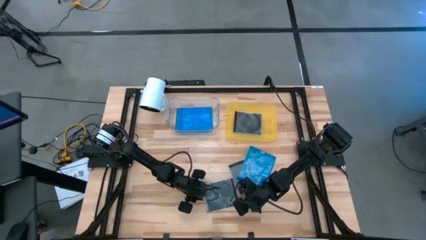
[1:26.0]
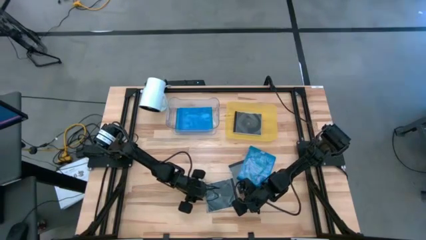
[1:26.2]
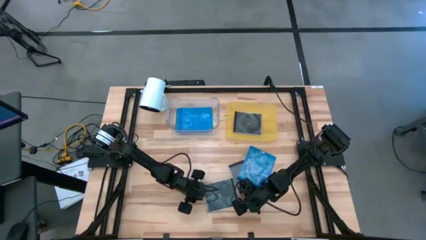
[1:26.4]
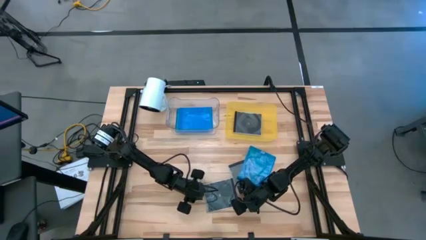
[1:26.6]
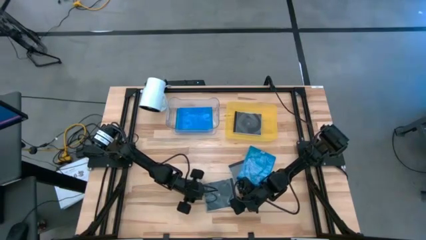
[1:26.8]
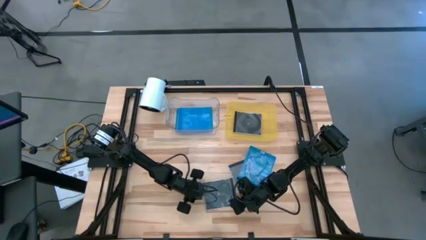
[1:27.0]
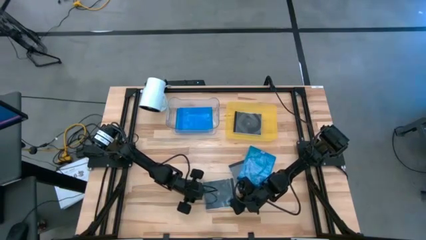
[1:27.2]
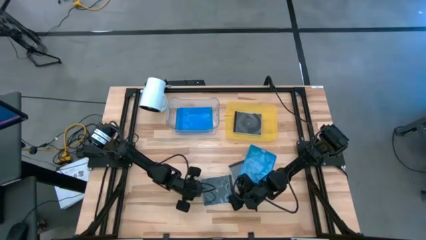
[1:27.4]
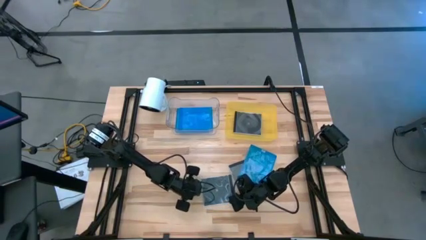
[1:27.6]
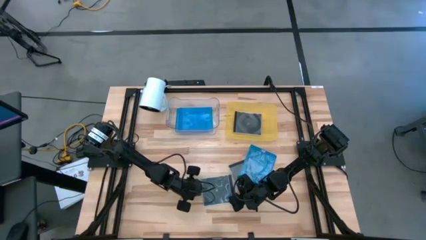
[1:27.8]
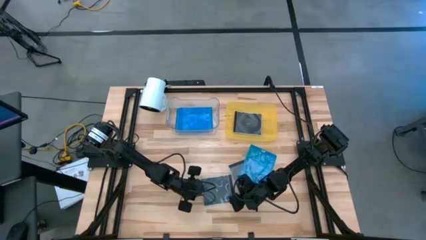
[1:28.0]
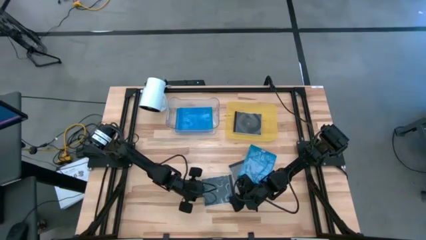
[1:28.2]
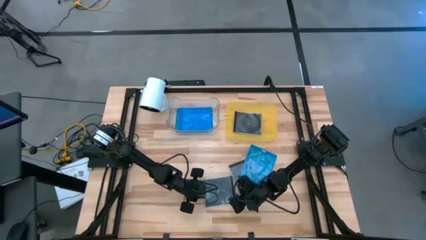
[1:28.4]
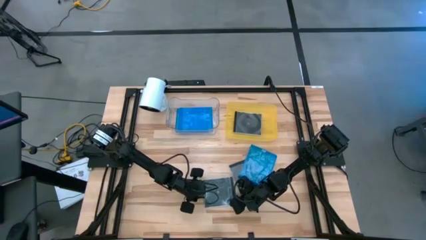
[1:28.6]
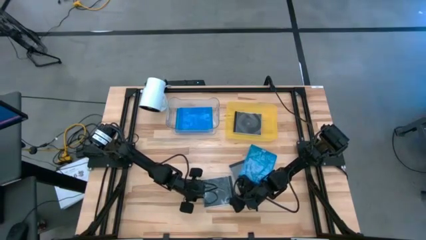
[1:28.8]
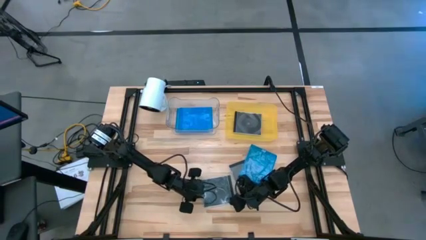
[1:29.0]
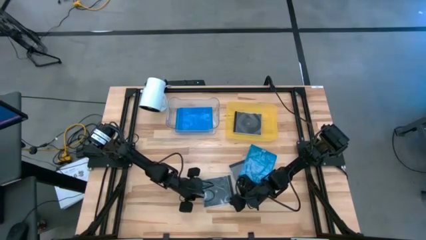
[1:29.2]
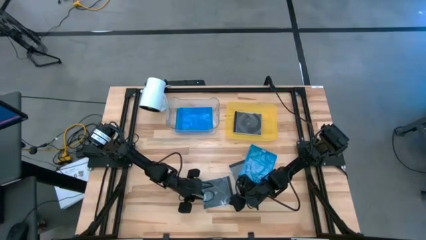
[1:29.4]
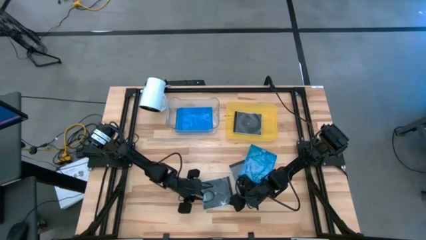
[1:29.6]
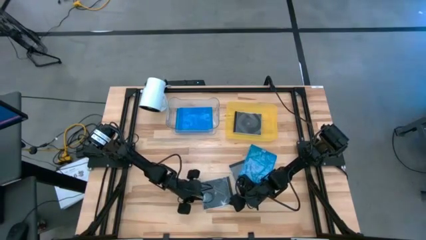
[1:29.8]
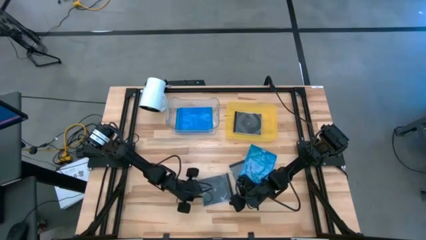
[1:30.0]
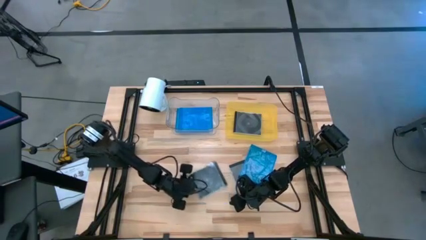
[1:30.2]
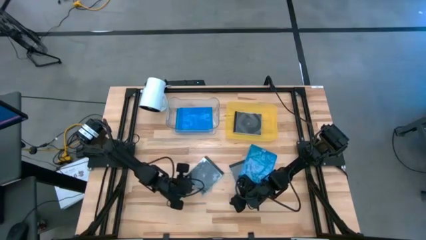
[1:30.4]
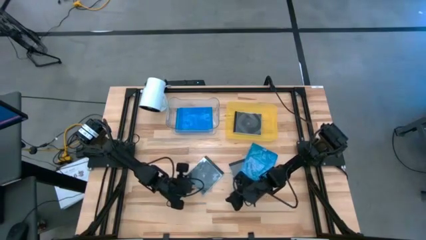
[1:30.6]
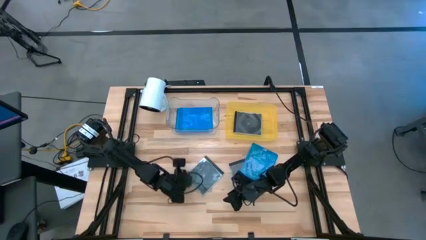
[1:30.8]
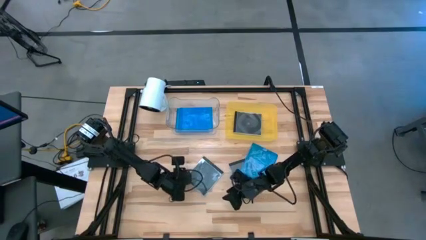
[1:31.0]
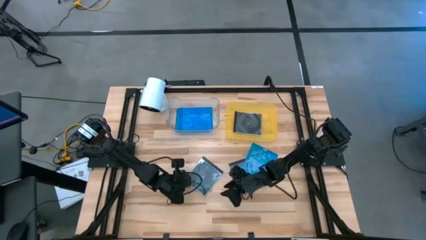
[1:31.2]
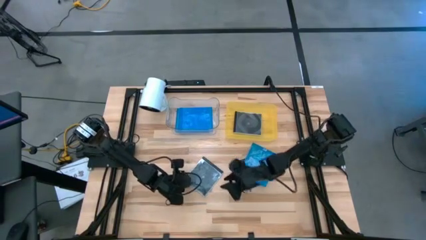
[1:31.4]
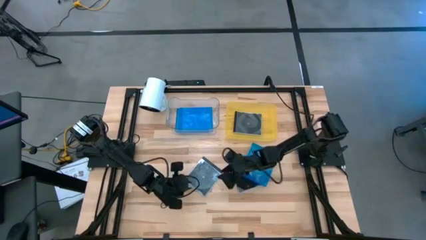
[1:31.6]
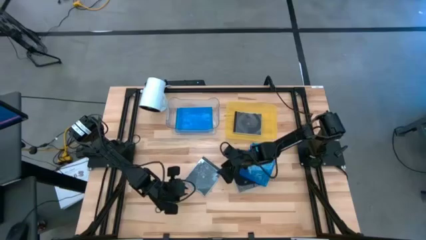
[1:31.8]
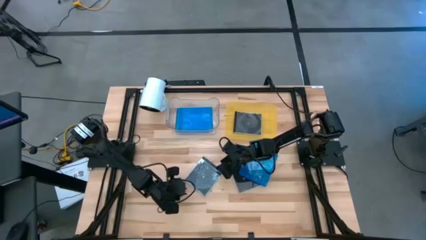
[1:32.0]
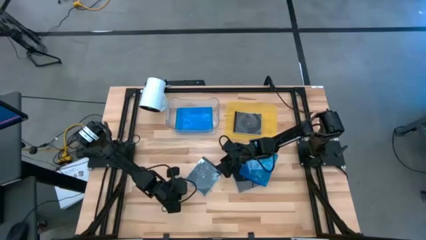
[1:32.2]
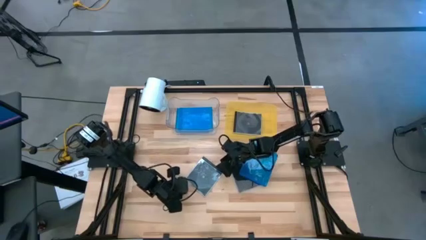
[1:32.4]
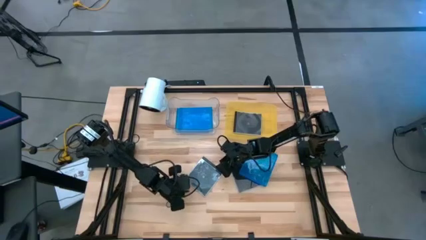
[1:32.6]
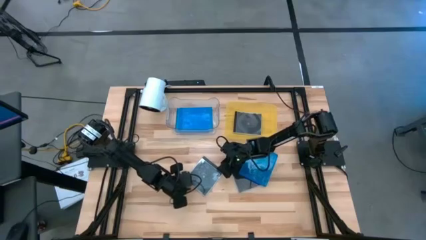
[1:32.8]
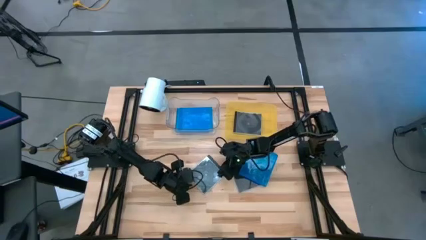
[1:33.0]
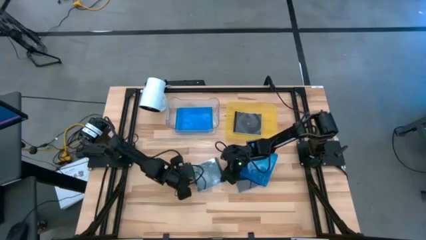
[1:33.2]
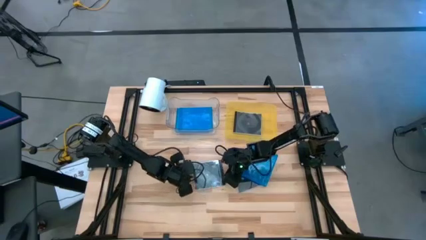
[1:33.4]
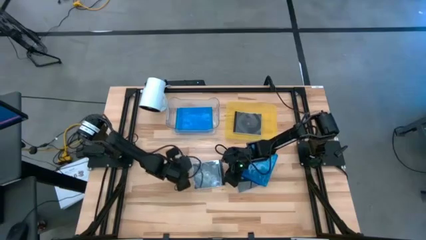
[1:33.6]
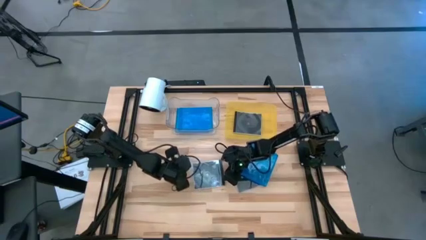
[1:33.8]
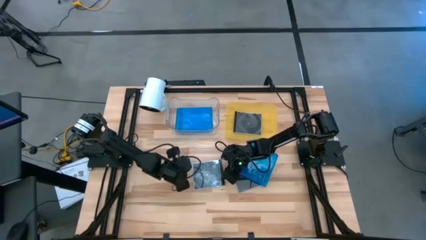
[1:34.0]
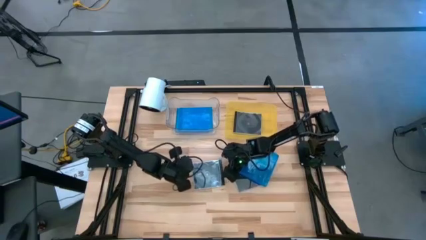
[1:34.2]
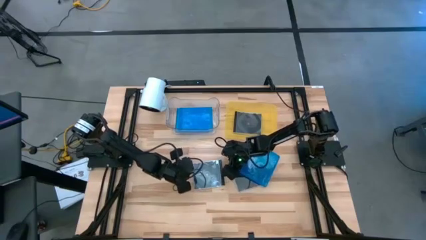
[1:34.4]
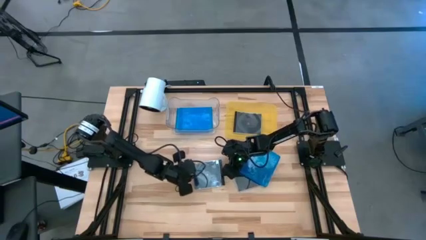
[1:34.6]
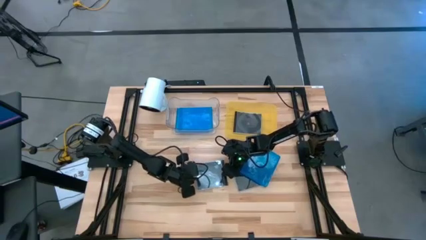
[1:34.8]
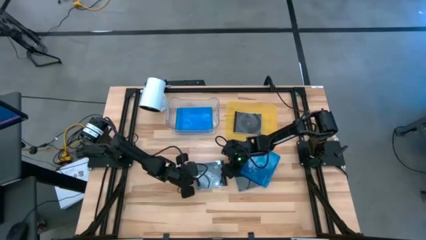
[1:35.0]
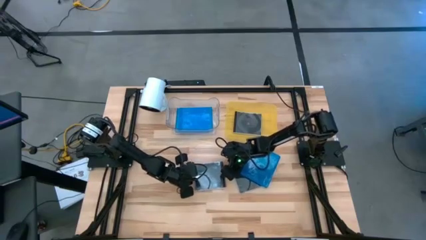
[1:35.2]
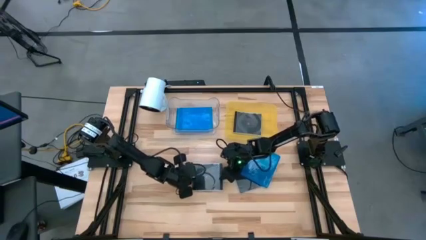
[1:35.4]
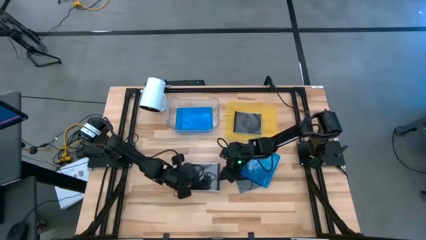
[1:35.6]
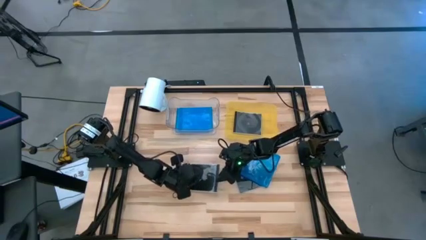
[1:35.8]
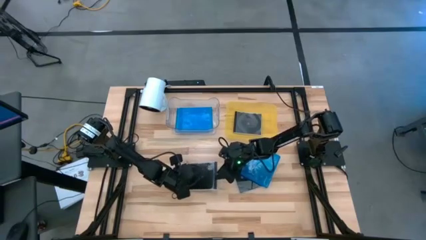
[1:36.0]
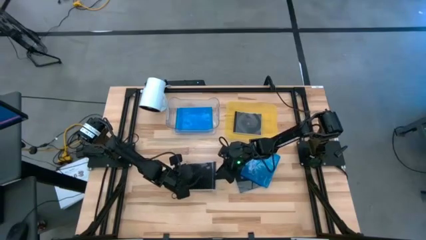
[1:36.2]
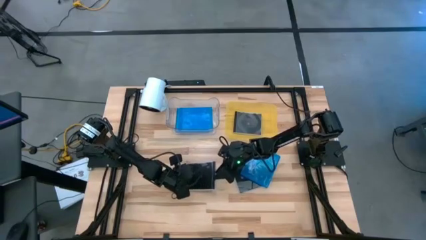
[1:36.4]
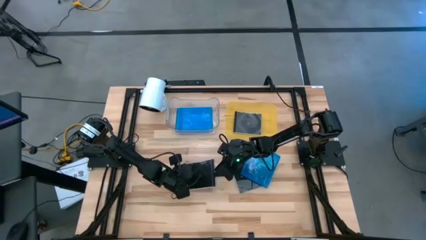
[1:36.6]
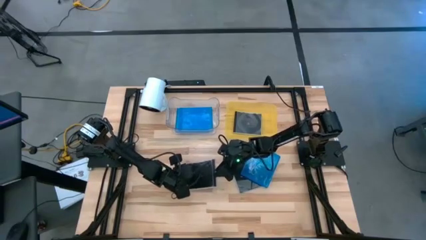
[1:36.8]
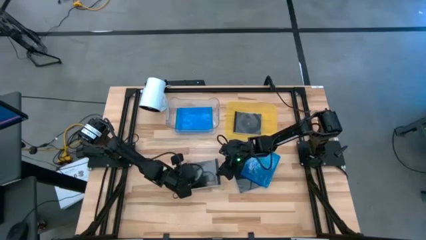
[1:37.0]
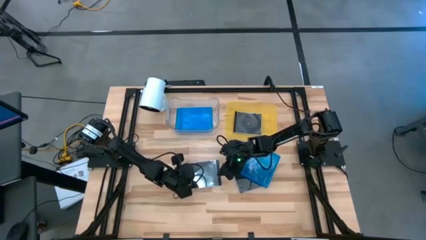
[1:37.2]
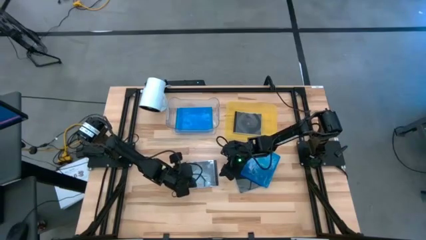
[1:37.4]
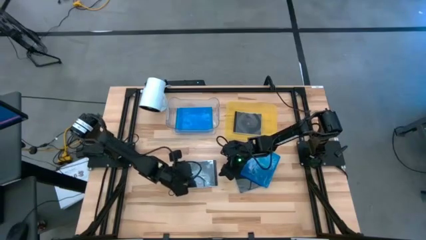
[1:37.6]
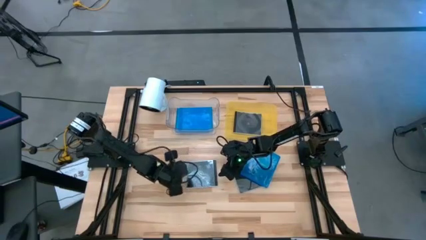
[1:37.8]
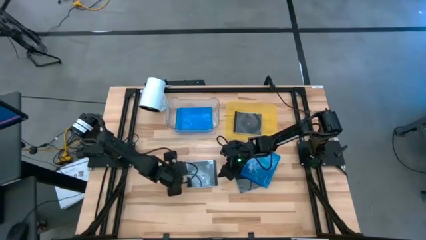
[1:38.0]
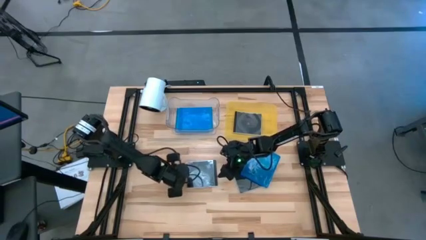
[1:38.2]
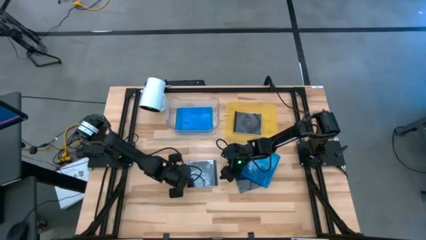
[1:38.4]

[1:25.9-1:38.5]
Task: Pick & place jewel cases by type
Put the left black CD case into the yellow bin
